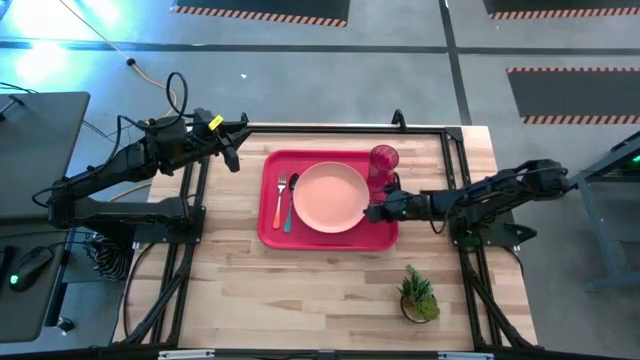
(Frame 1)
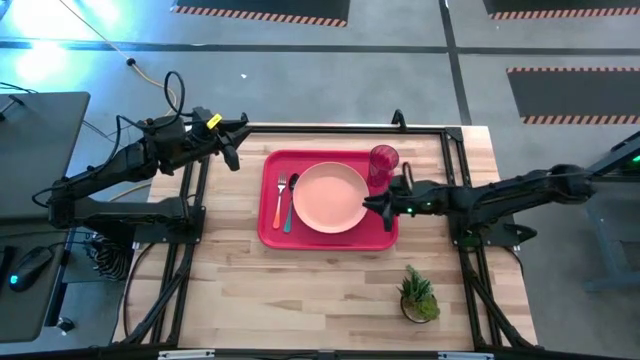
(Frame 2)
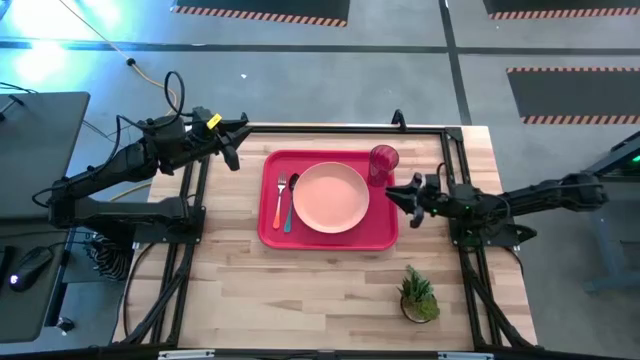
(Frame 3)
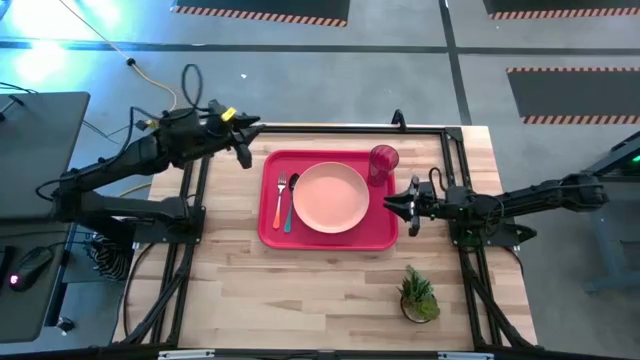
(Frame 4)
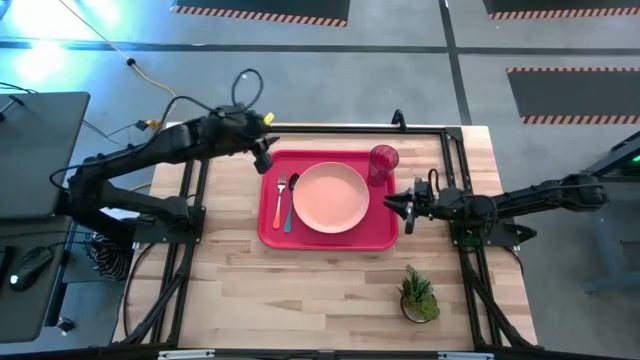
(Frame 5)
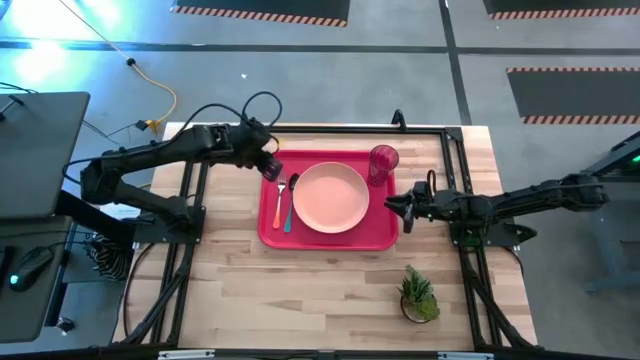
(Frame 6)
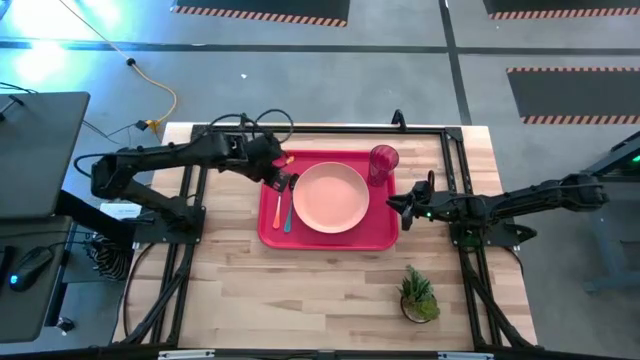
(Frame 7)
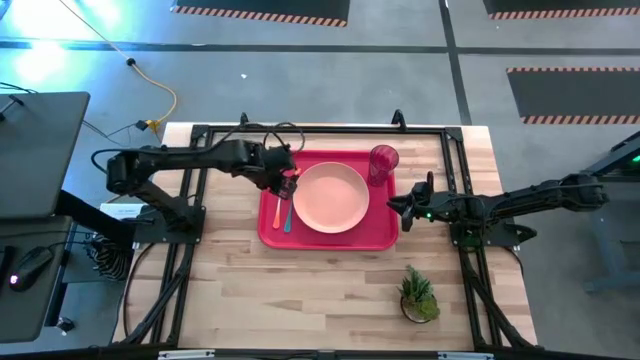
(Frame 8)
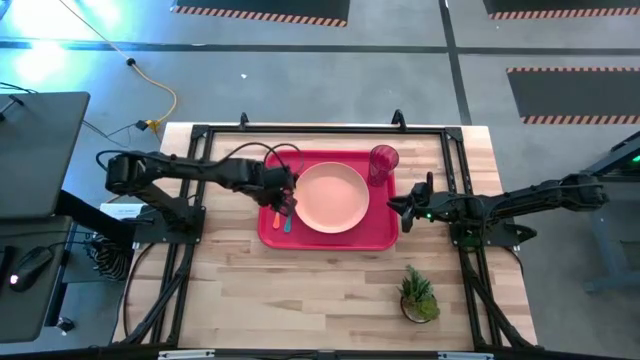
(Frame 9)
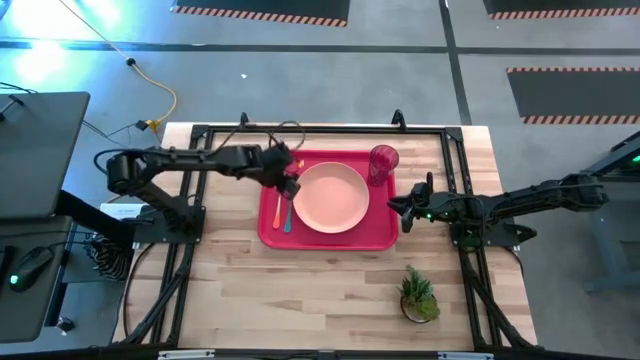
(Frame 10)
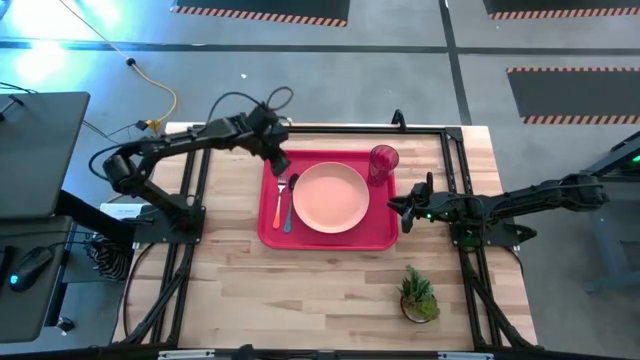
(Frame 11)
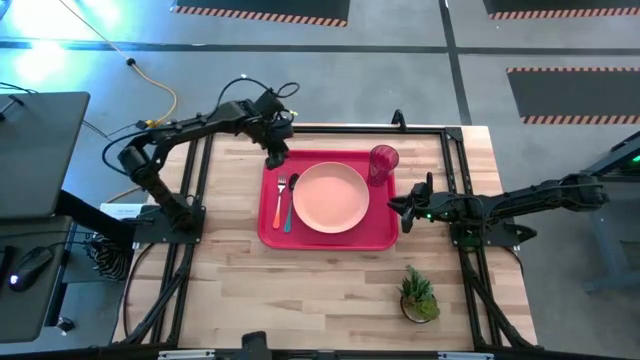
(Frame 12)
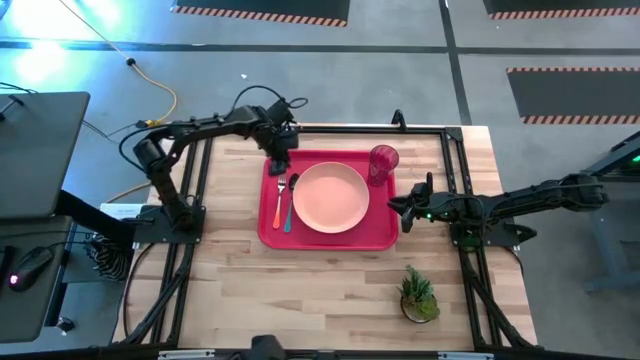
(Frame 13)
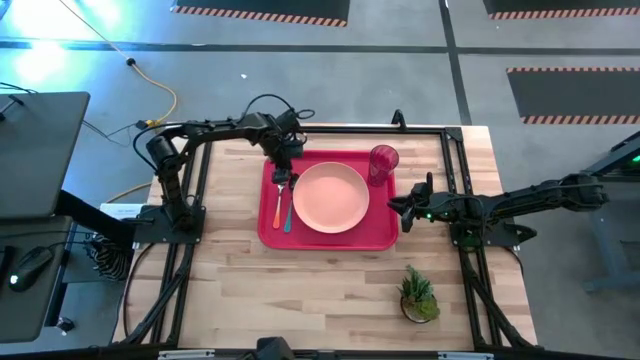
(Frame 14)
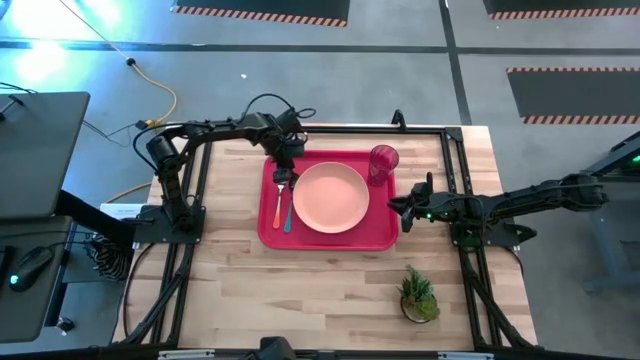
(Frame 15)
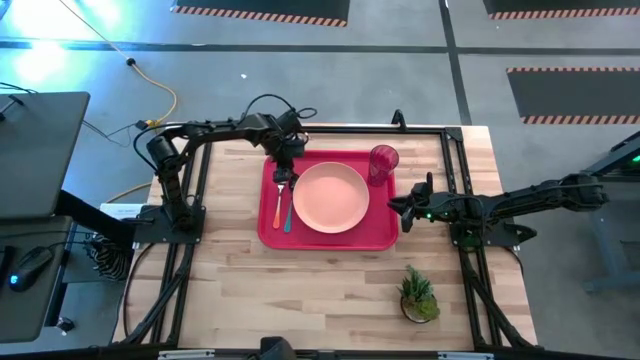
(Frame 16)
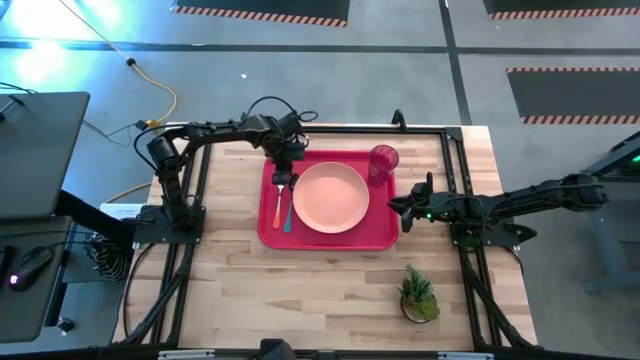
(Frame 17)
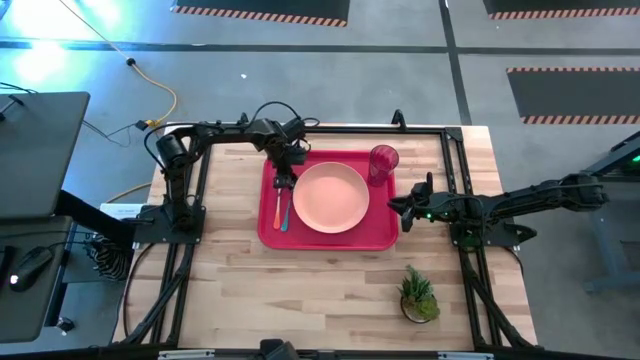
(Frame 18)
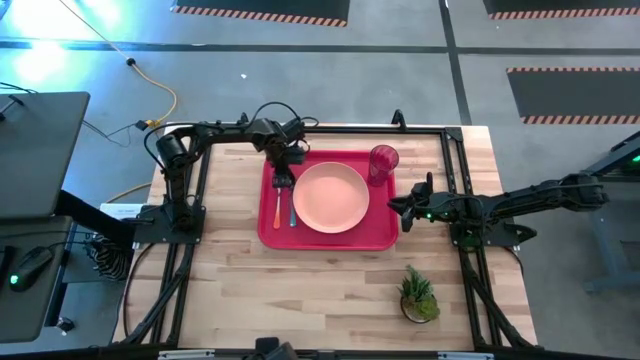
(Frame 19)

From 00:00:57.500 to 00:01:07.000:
Task: Pick and place plate/cup/fork/spoon on tray
Adjust the plate and spoon on the tray

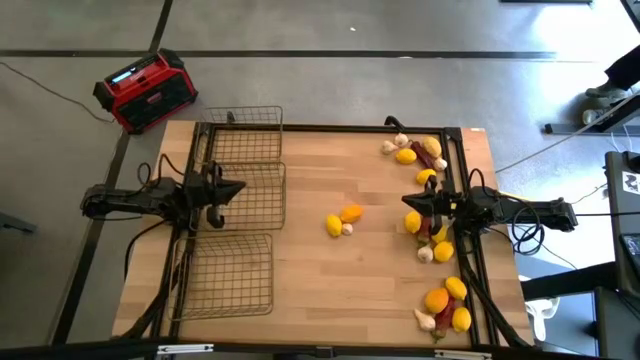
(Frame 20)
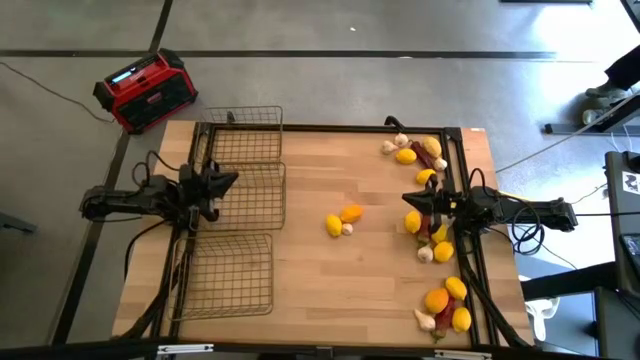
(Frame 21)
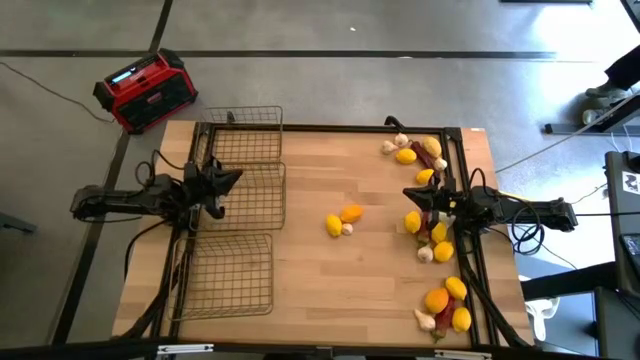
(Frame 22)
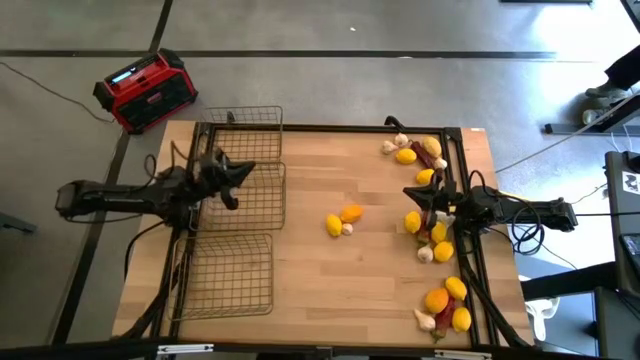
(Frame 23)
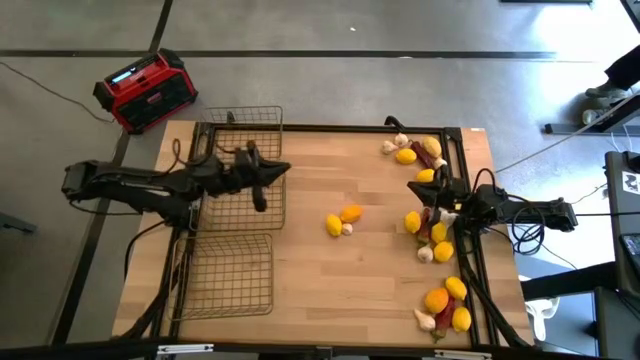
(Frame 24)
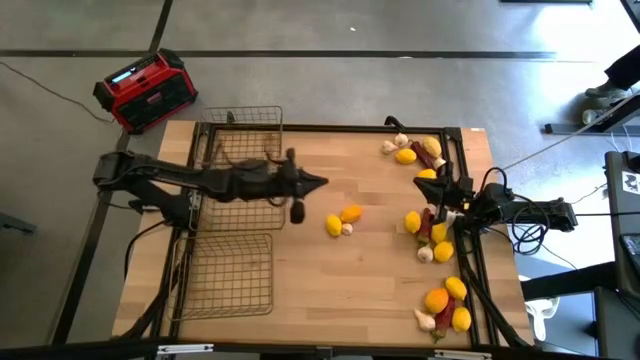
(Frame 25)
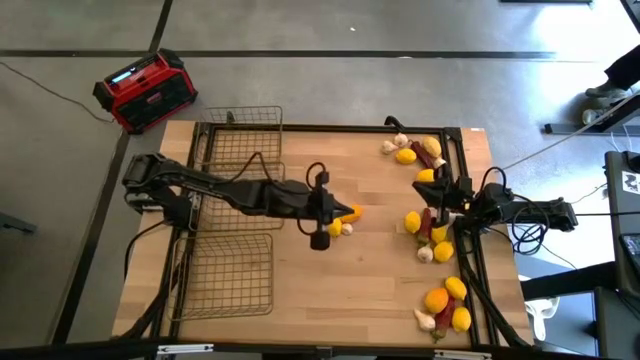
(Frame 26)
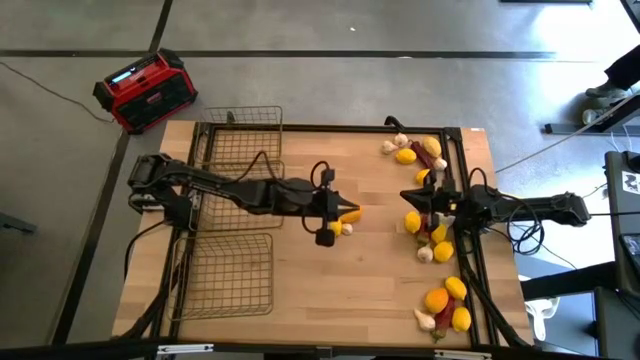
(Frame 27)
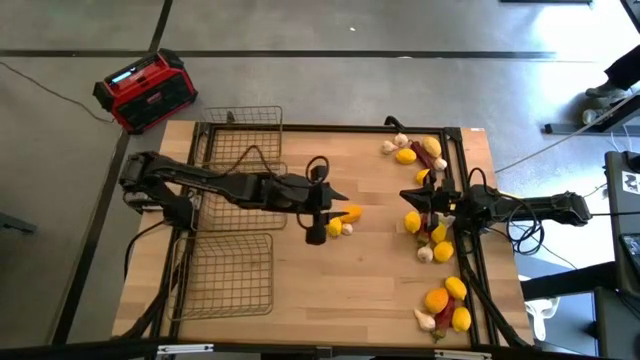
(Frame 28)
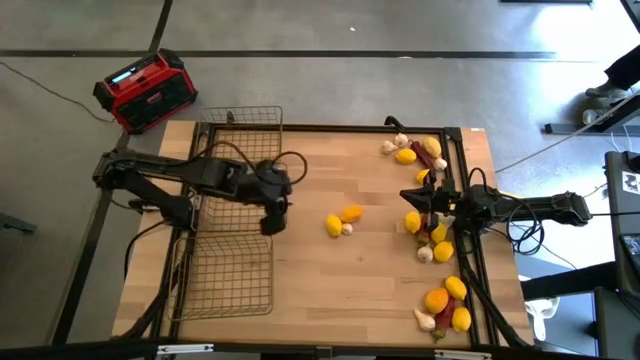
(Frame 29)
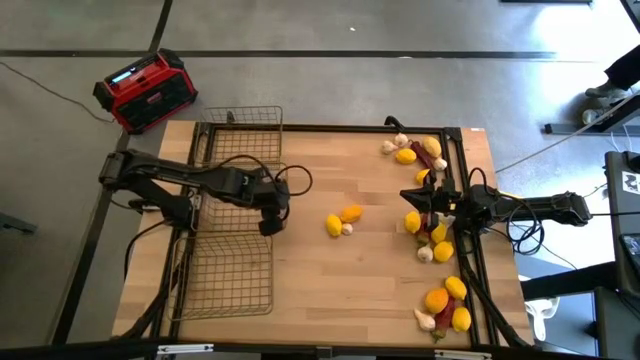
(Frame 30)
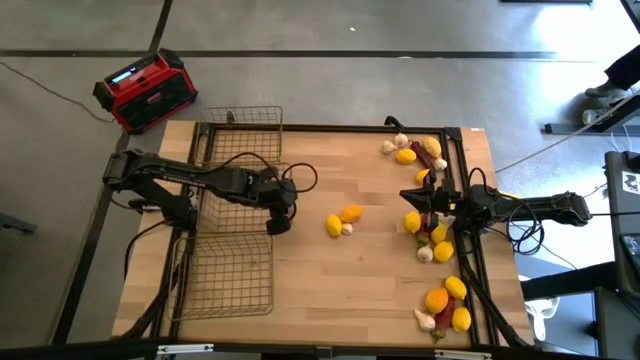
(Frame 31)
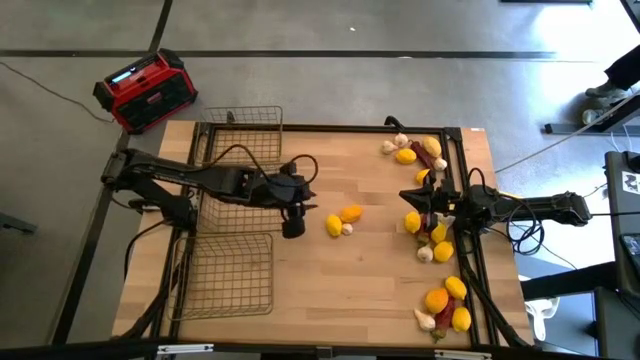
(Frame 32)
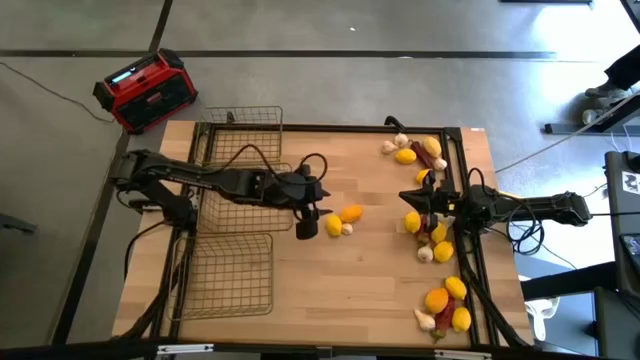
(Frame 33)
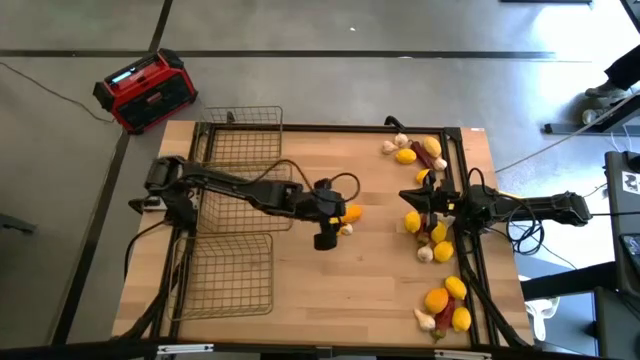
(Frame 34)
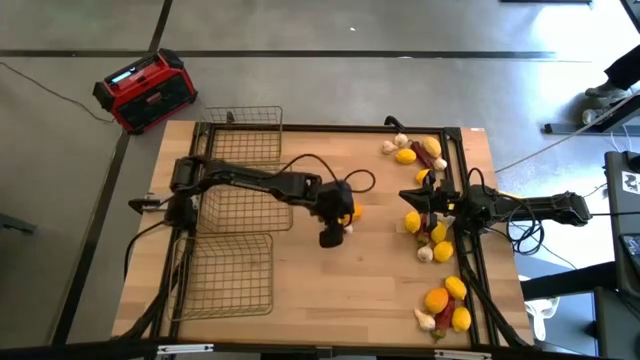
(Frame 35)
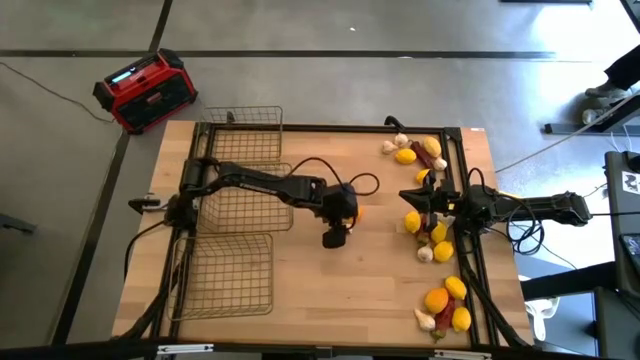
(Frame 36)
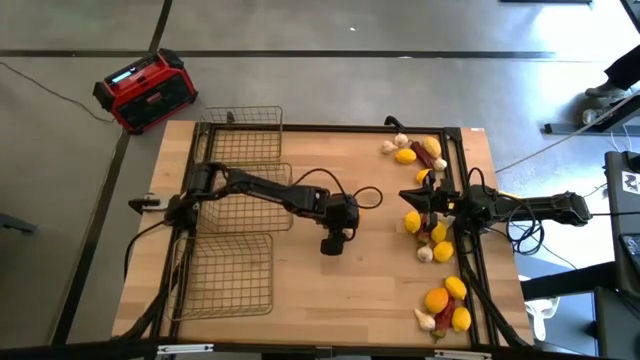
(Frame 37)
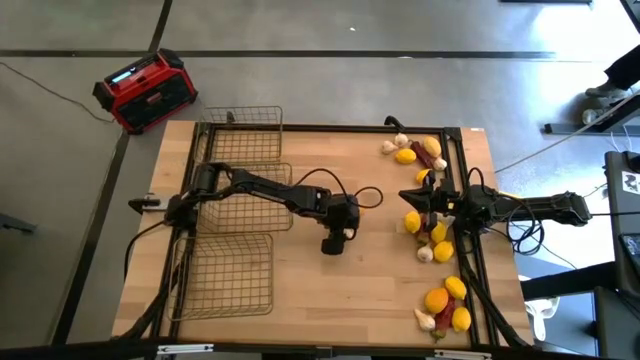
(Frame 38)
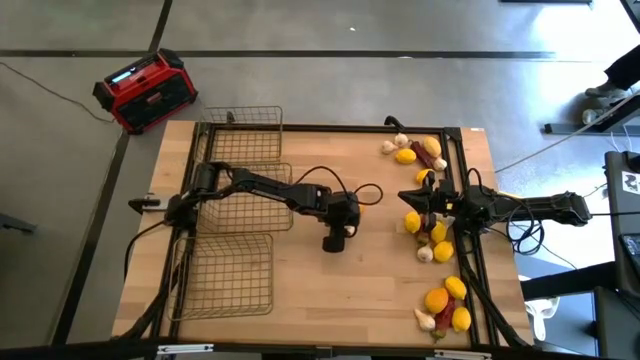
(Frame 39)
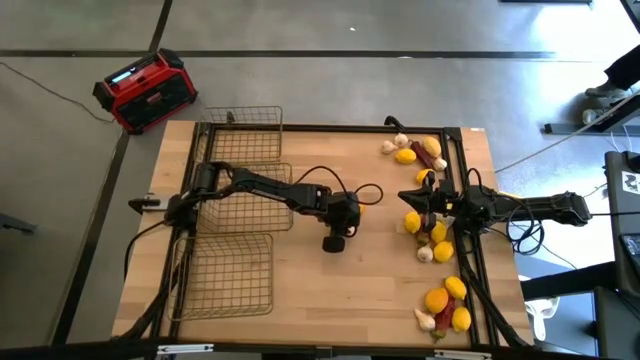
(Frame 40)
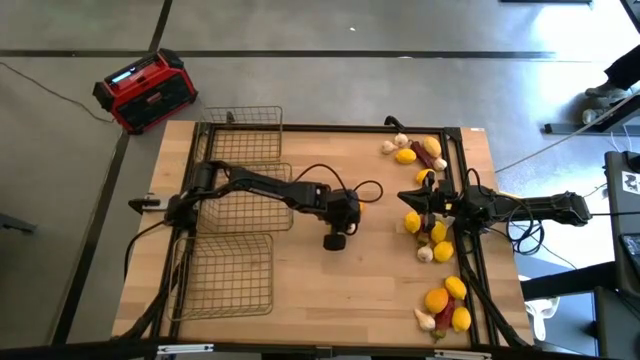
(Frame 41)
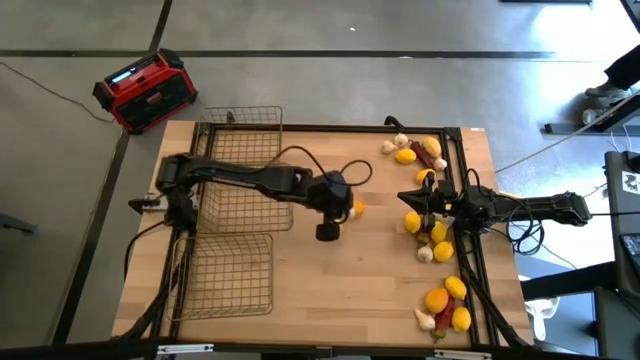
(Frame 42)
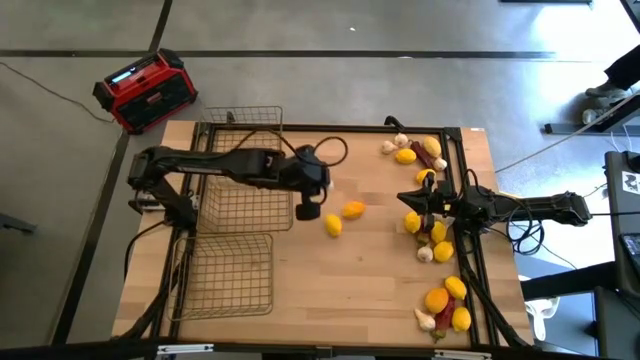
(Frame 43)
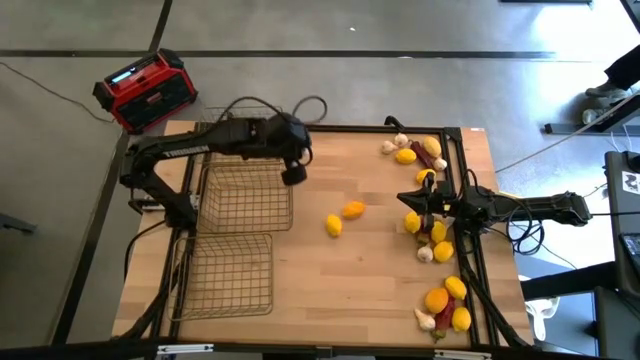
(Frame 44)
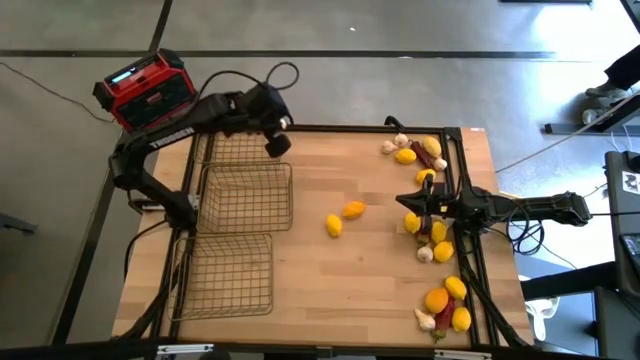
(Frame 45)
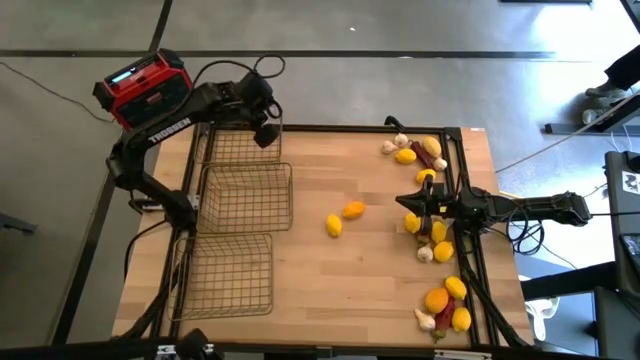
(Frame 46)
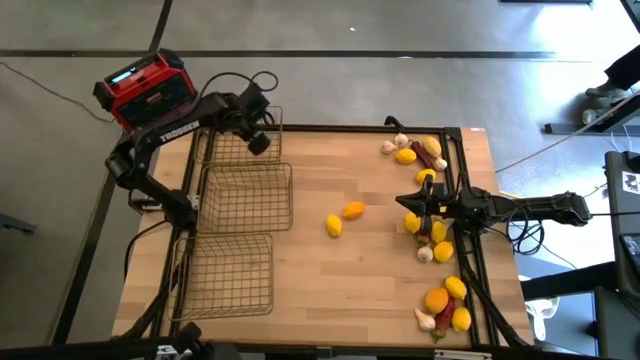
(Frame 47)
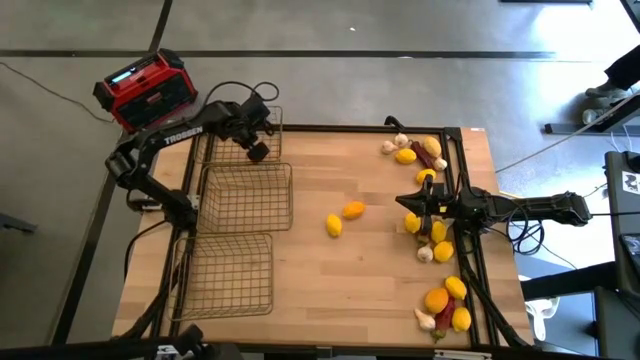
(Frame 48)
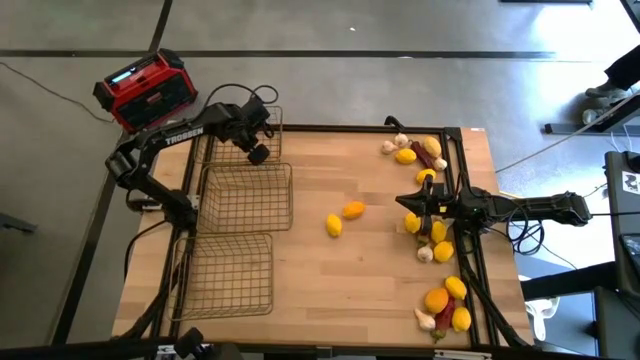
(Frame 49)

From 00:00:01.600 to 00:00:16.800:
Task: Sort produce into baskets
Put the garlic in the top wire basket
